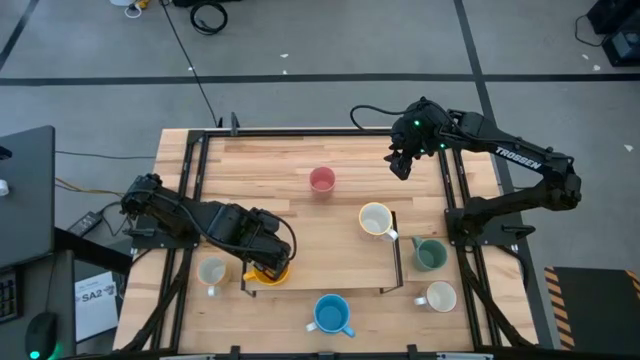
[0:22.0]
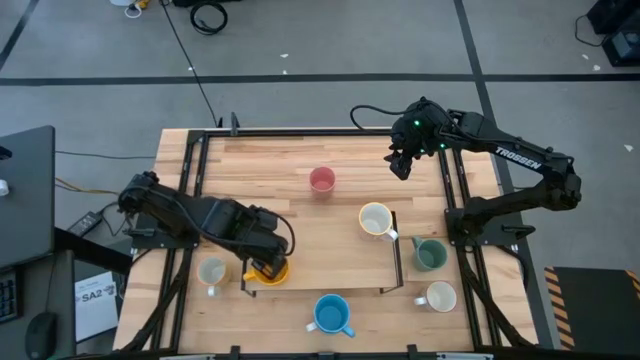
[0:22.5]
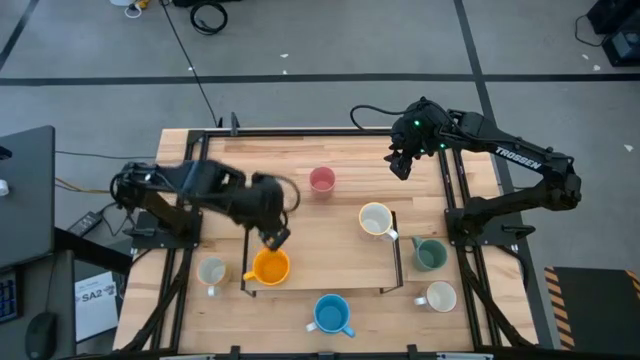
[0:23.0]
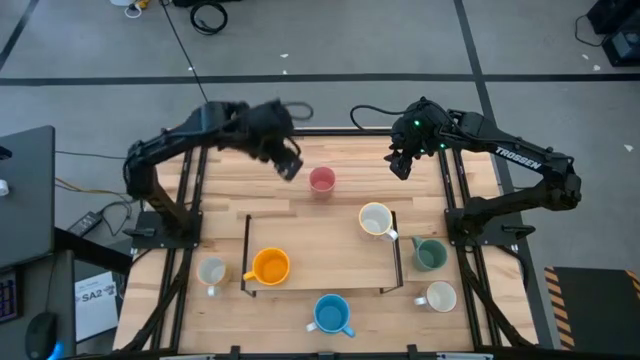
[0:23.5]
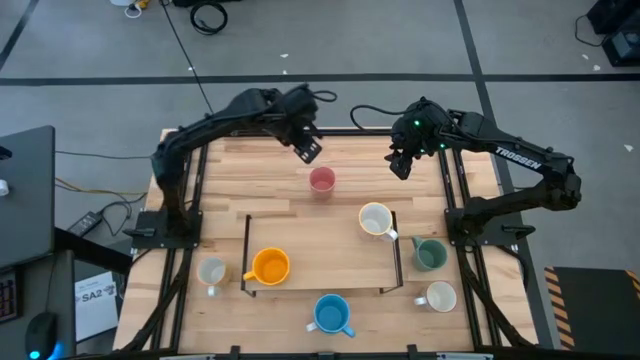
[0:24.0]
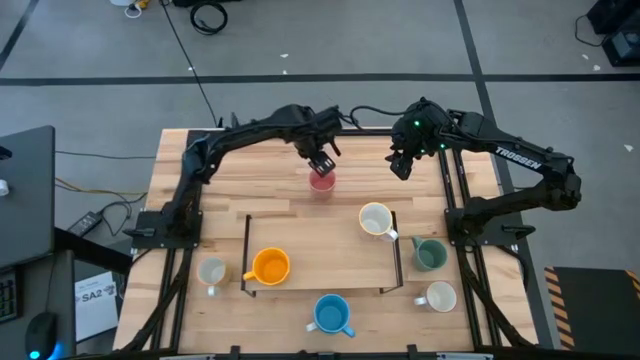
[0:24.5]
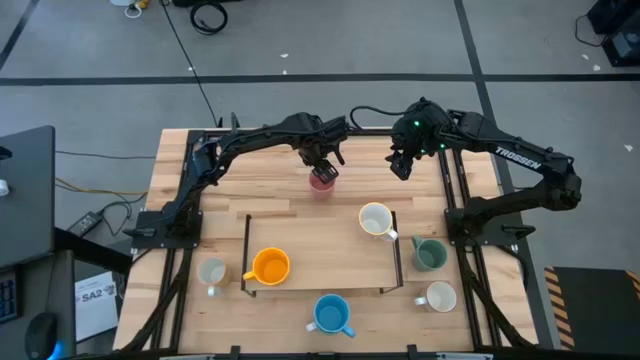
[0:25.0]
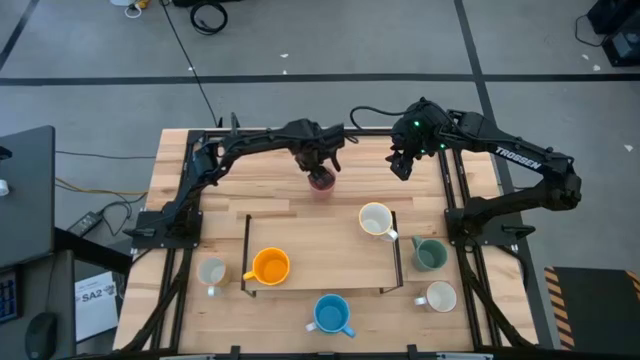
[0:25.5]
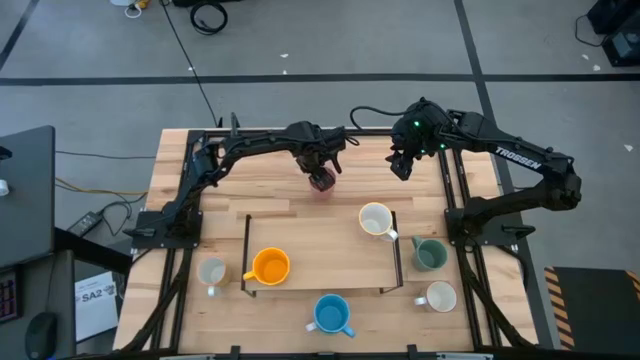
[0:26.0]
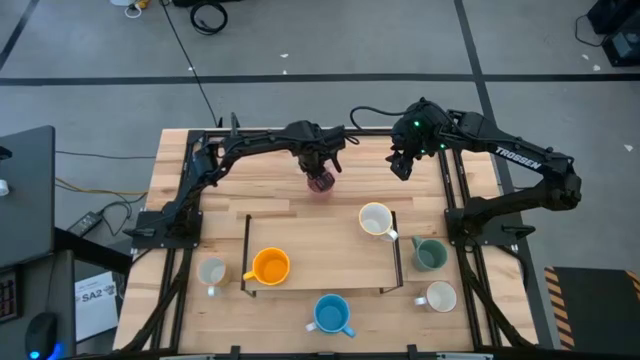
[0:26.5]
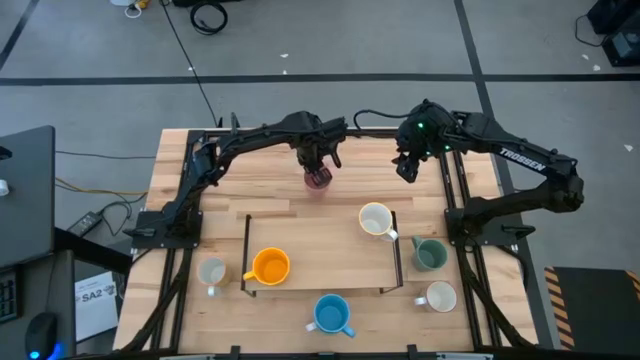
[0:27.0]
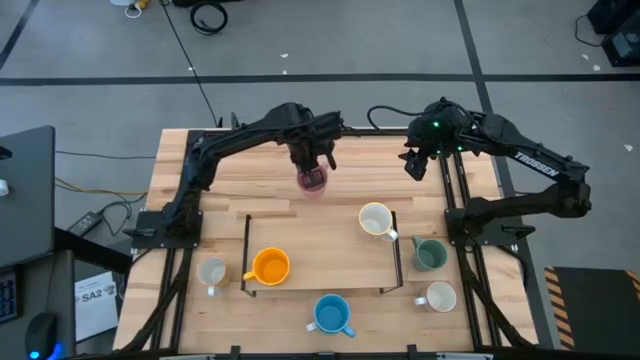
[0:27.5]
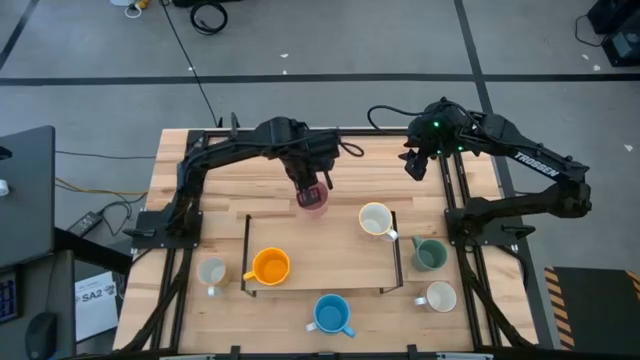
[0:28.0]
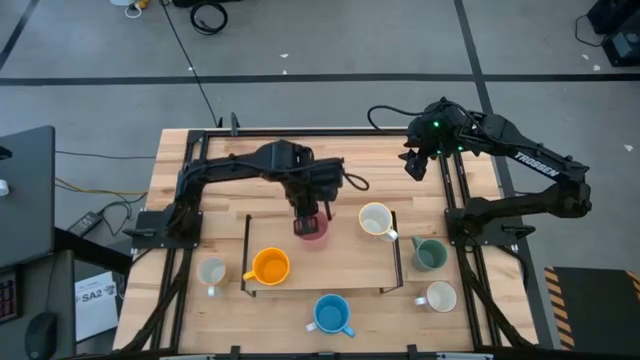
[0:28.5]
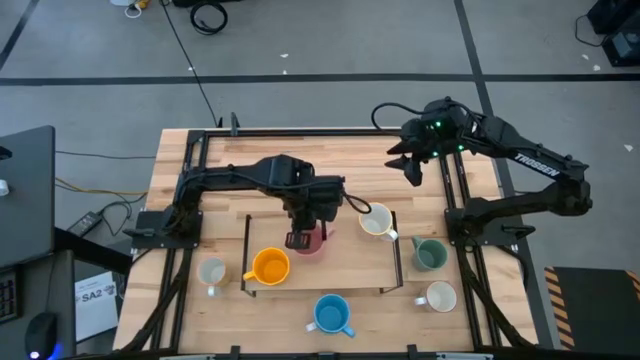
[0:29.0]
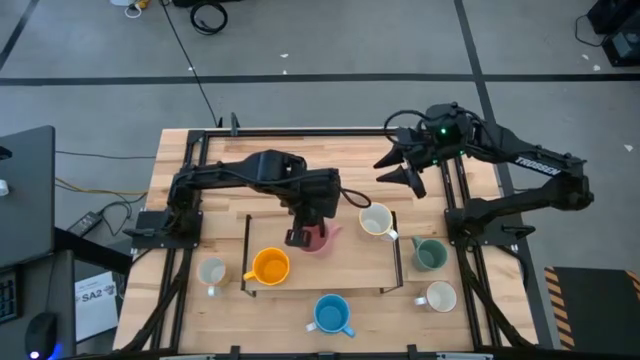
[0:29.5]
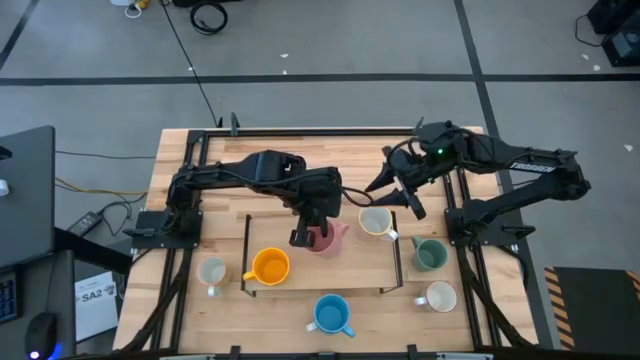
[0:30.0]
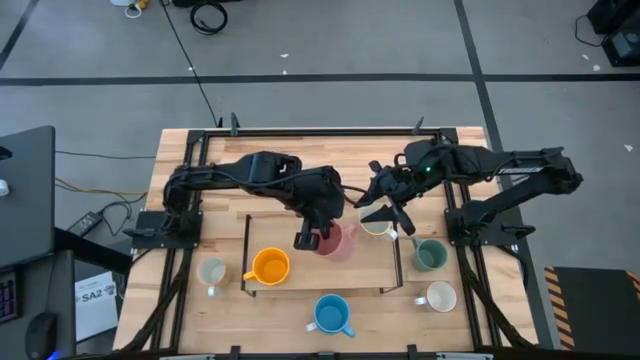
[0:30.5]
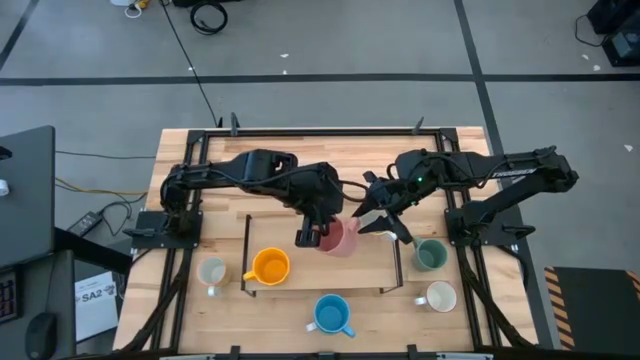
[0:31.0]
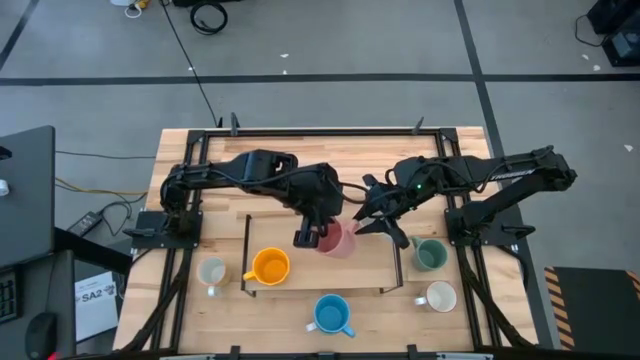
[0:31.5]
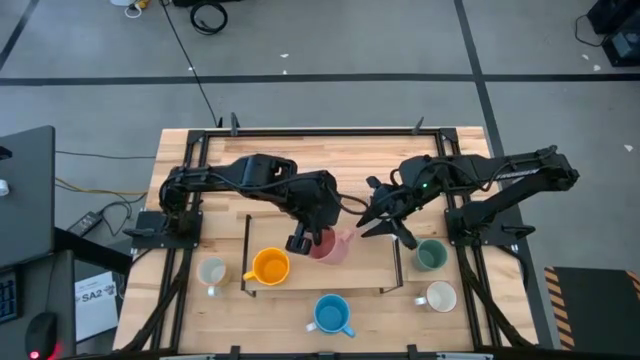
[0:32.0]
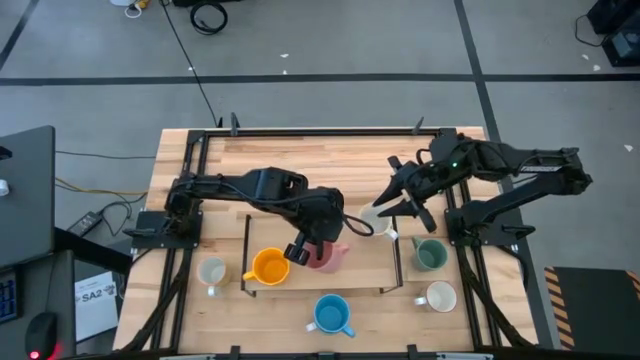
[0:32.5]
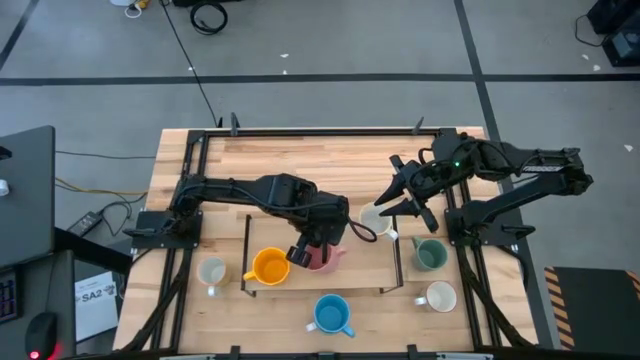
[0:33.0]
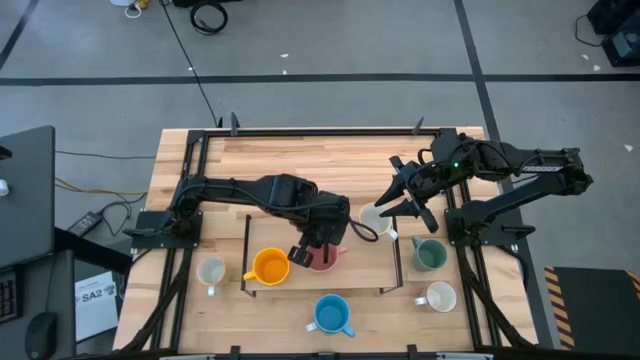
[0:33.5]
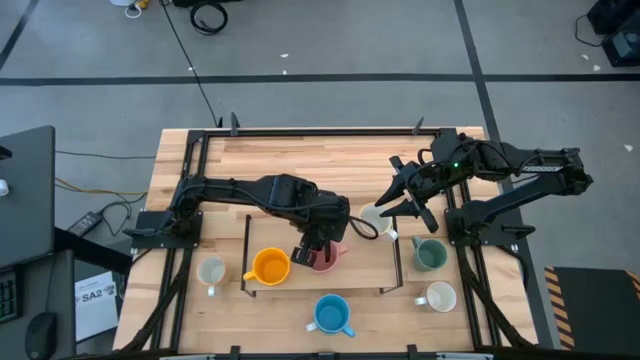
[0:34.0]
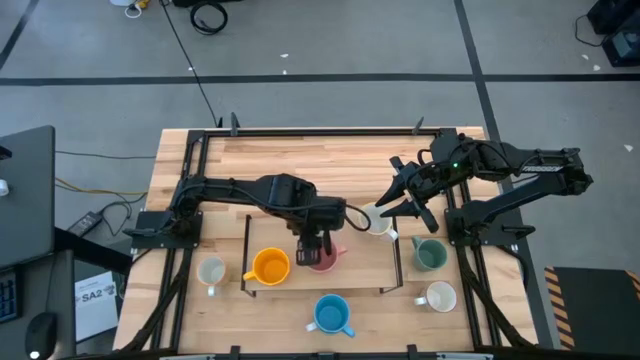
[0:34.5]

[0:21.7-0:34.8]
Task: Place coffee mugs
Put the pink mug on the shelf

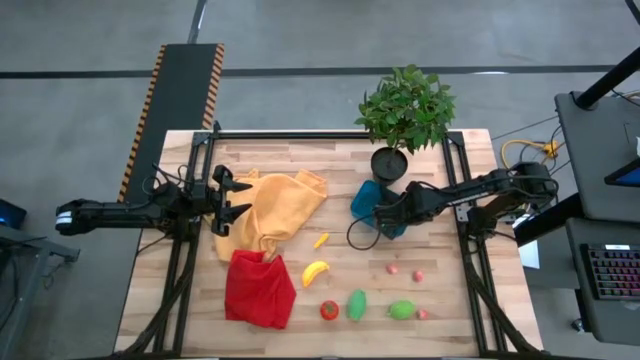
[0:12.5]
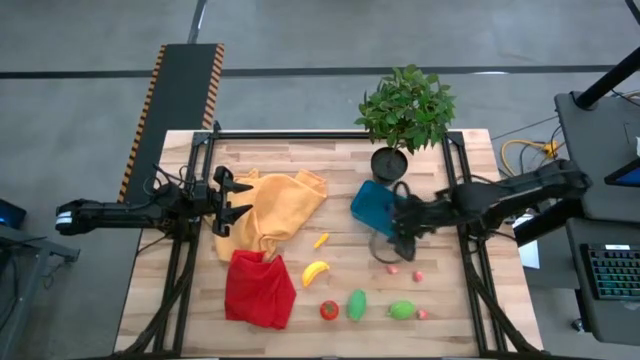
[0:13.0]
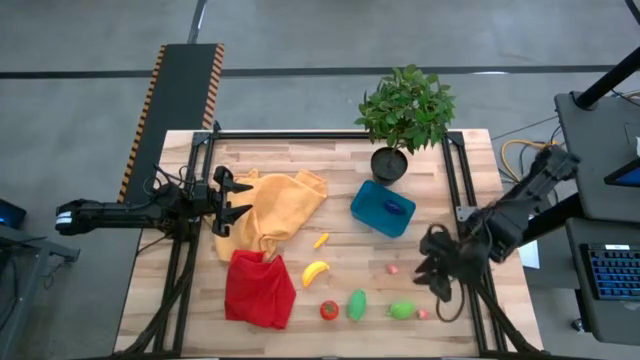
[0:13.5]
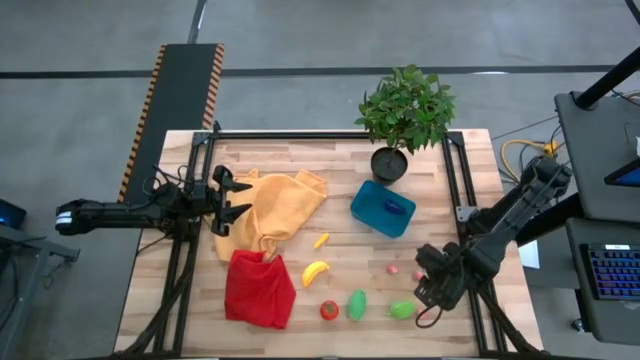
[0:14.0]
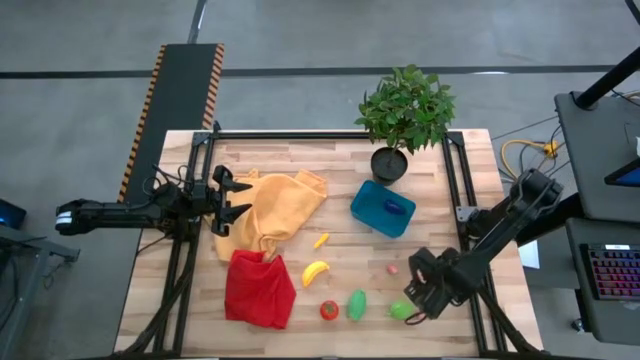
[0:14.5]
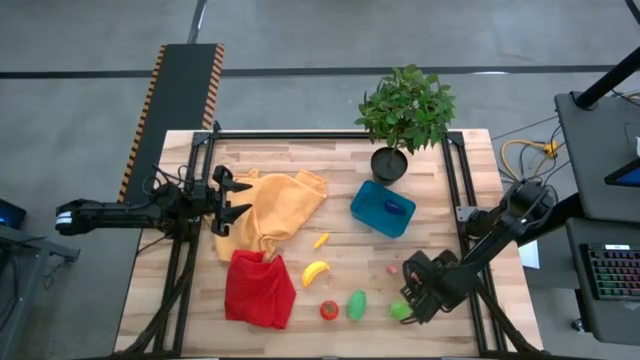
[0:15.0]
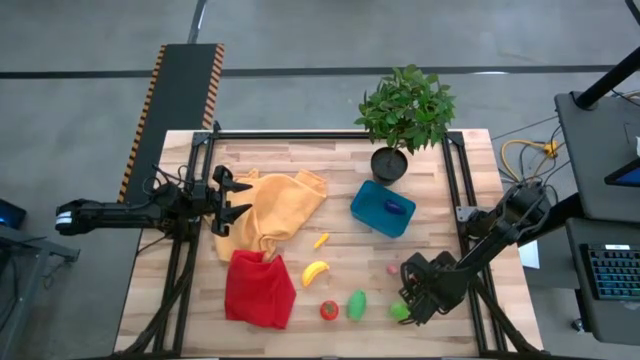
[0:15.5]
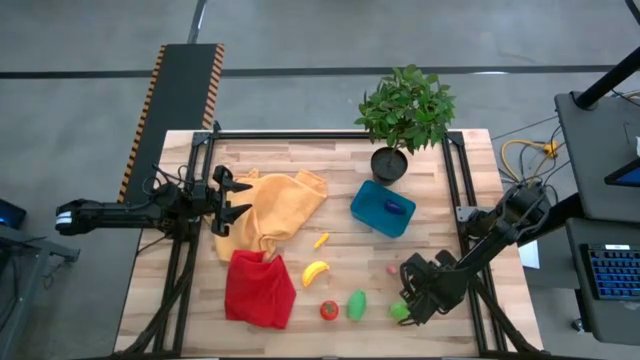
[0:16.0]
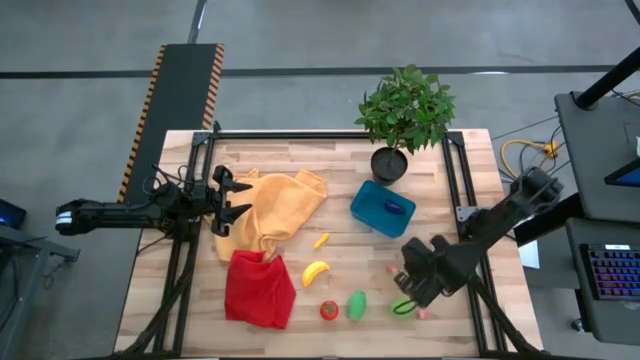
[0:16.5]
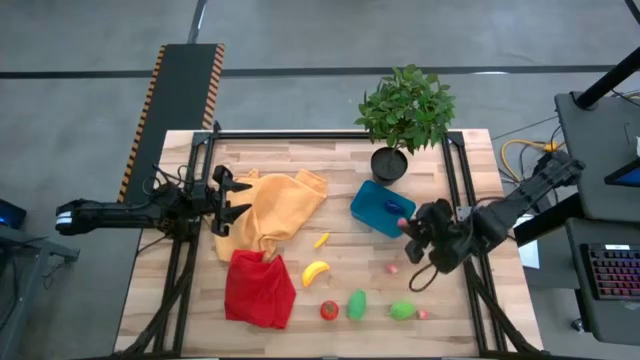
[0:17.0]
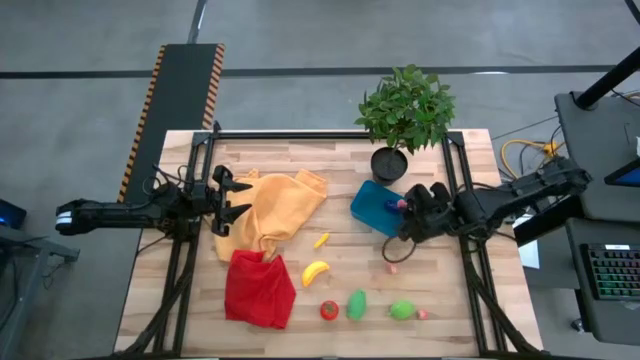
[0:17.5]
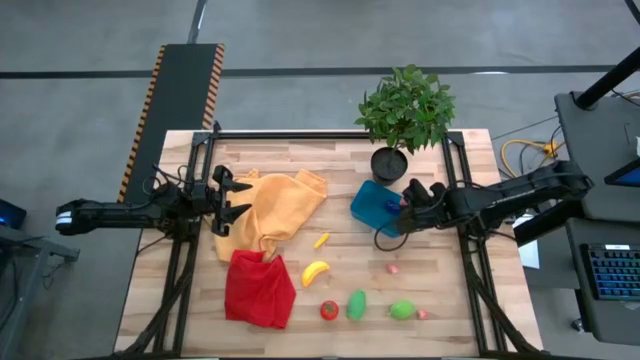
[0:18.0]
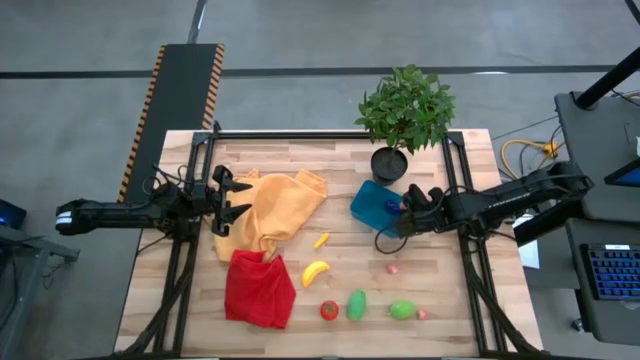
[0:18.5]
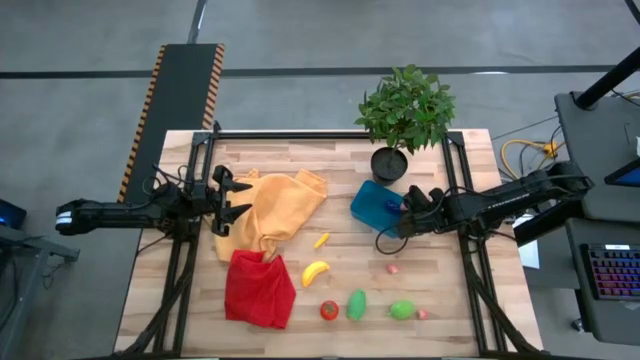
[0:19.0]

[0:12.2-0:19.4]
Task: Pick and placing Produce into tupperware
Put the top right peach into the blue bin

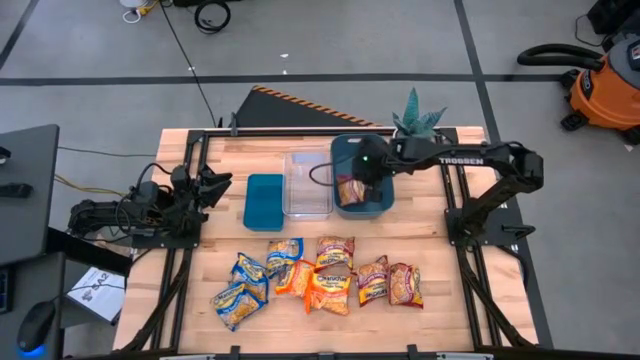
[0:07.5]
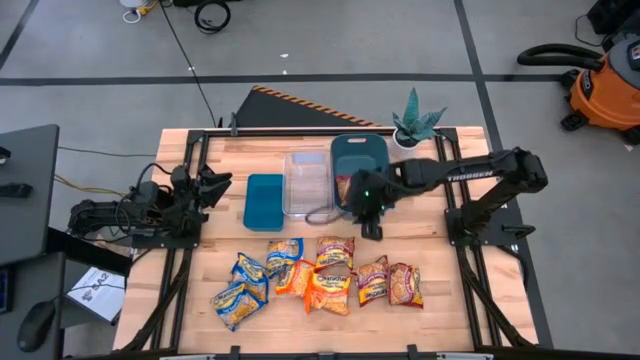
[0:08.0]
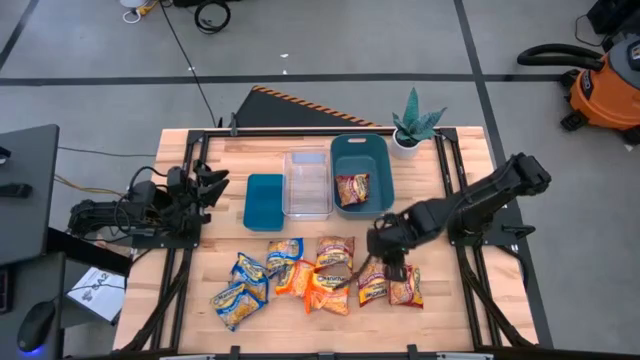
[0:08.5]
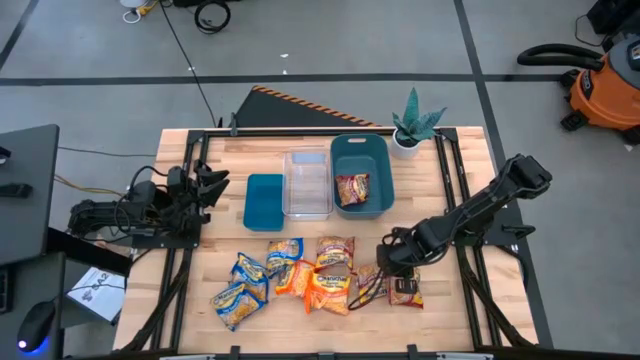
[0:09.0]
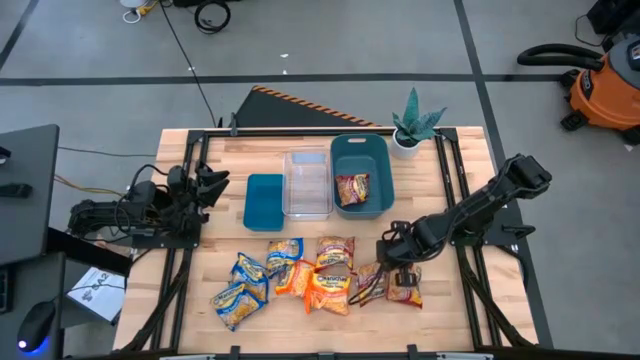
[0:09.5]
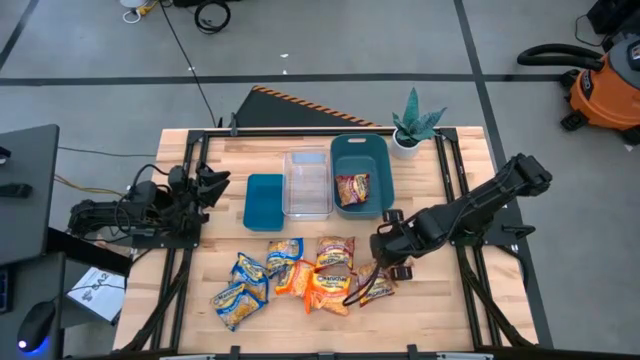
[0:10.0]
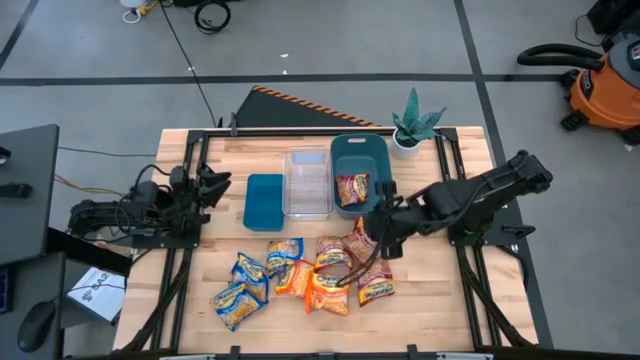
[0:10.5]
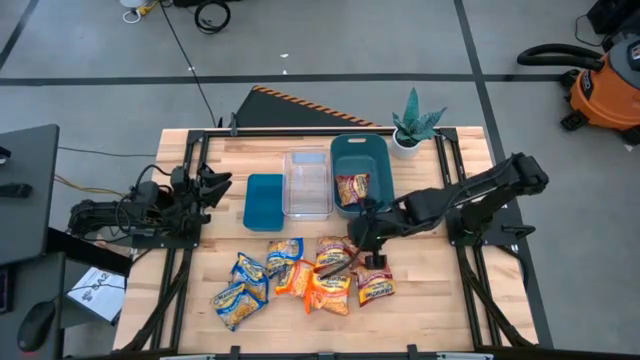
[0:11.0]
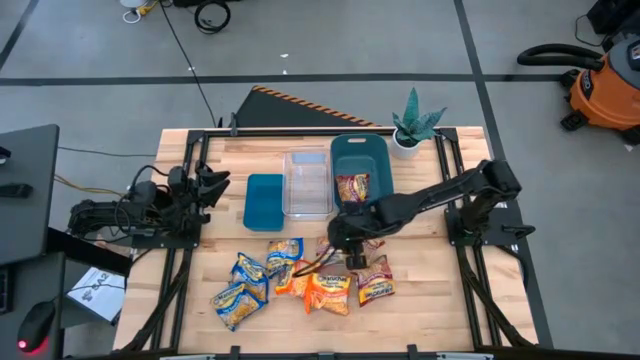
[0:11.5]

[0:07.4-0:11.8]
Task: Sort Maruchan noodles
Put the red noodle pack into the green bin
